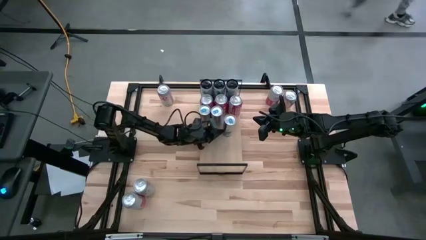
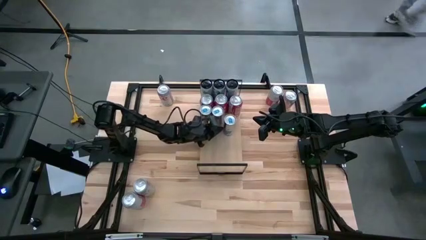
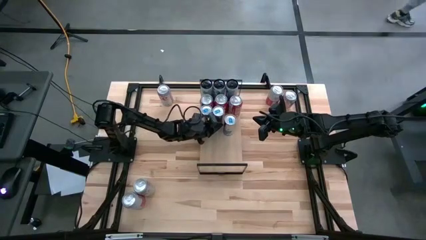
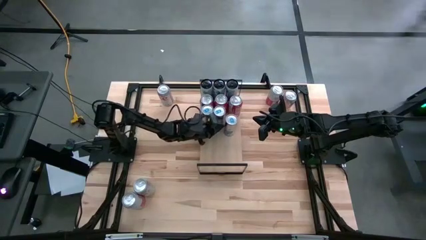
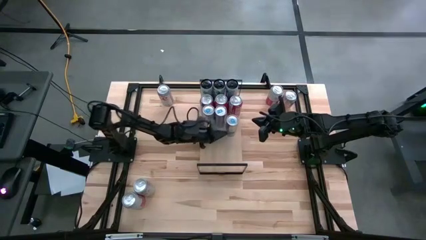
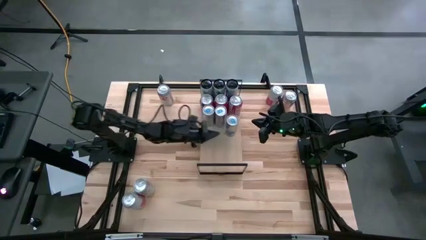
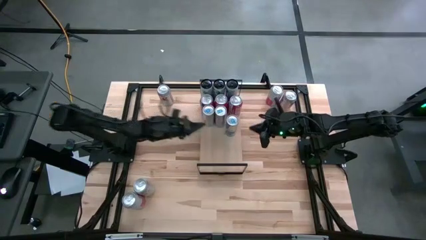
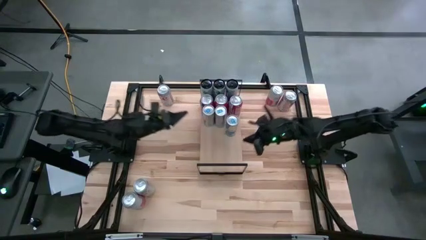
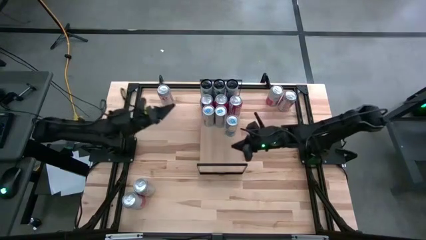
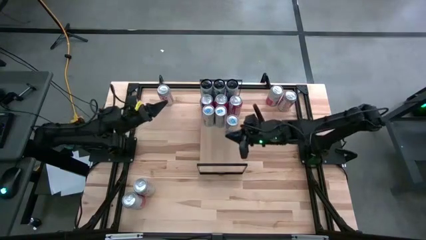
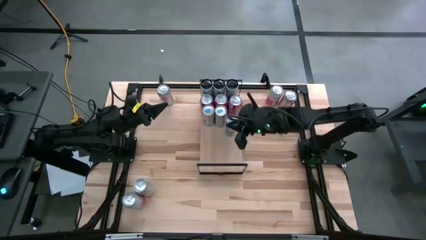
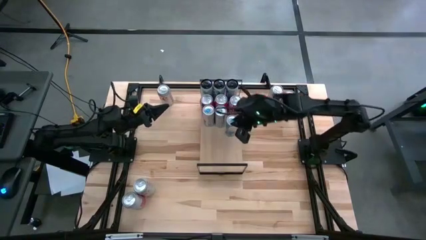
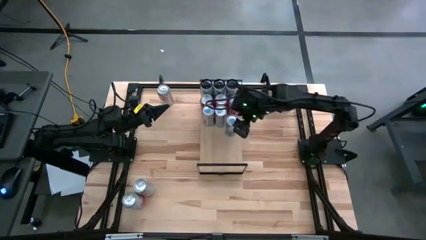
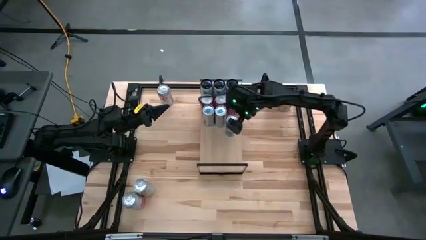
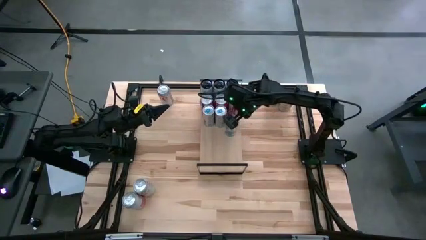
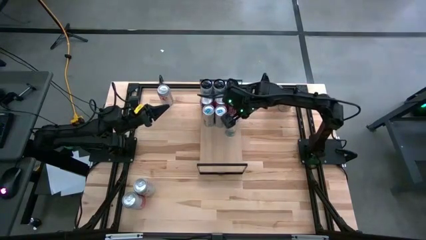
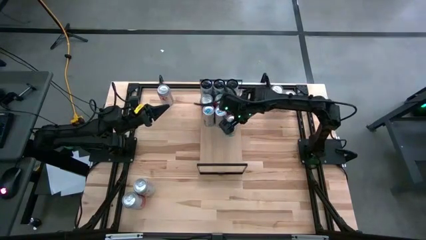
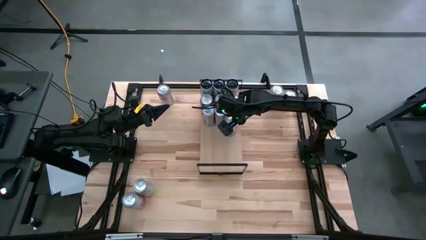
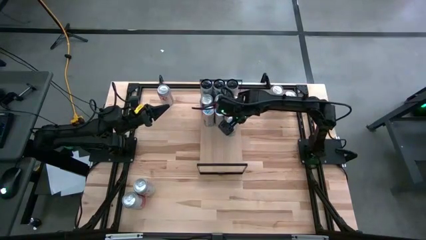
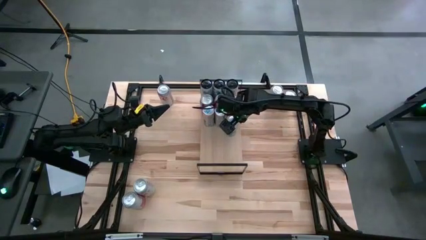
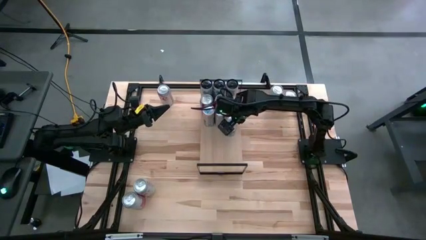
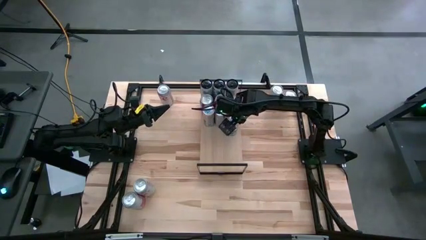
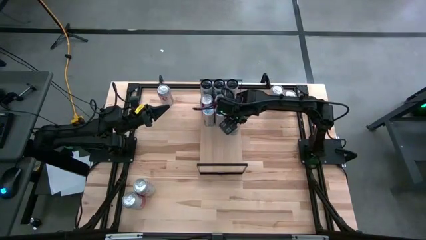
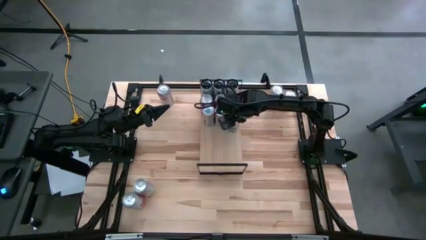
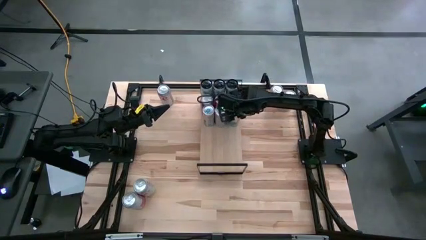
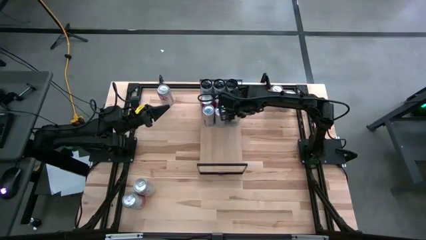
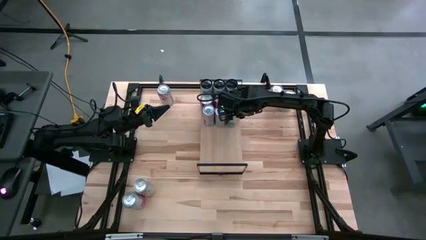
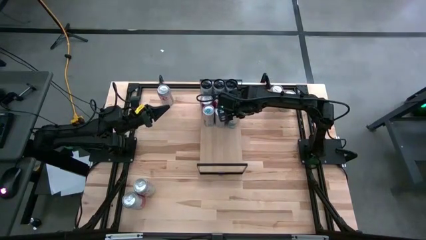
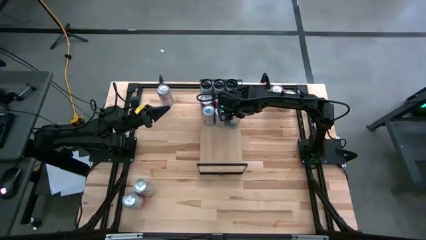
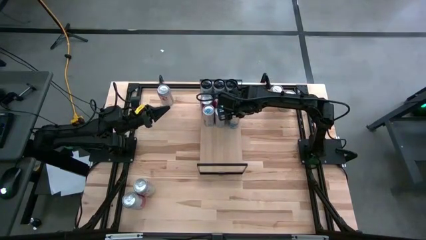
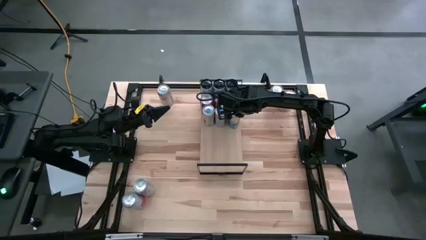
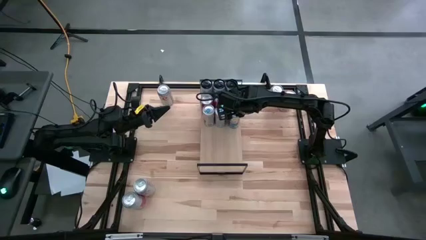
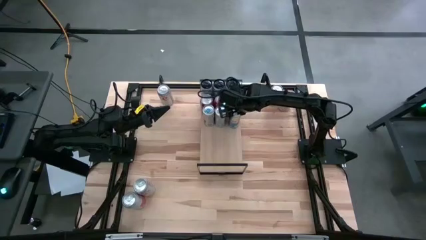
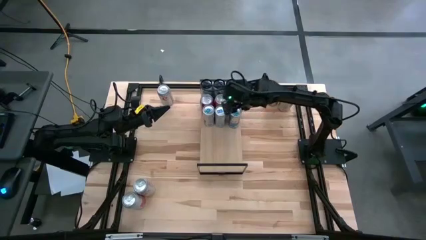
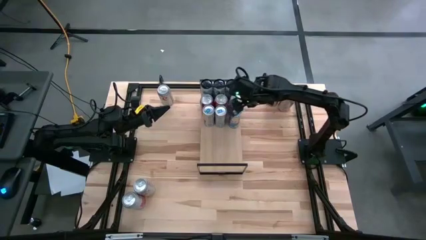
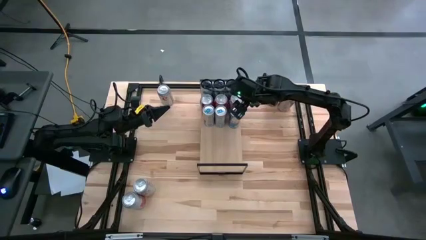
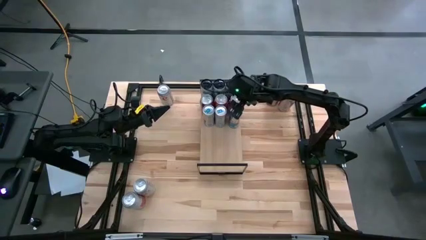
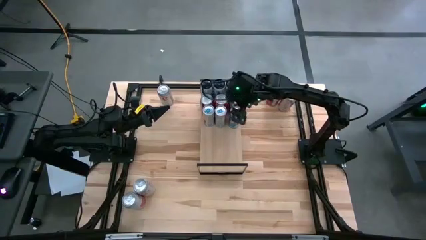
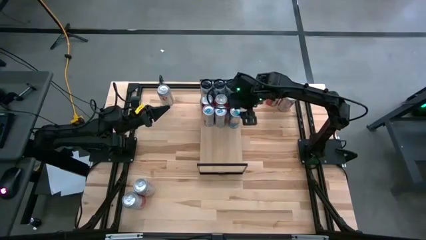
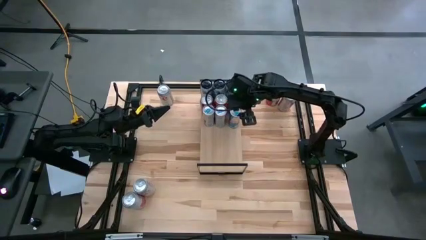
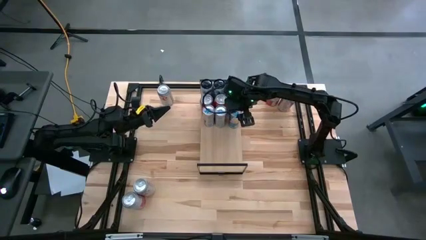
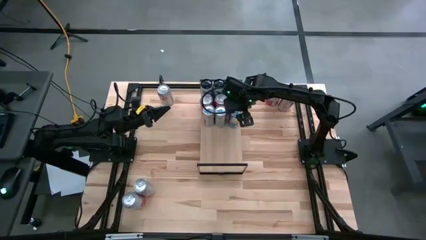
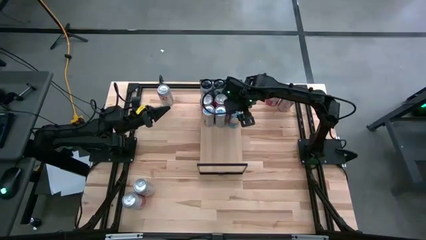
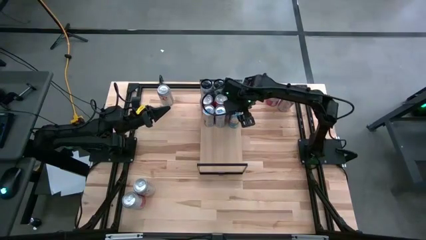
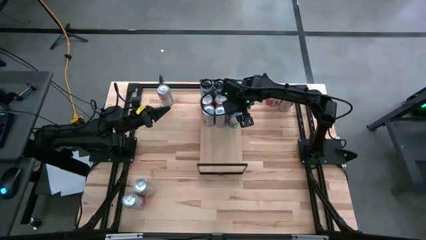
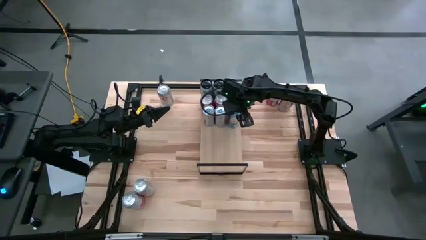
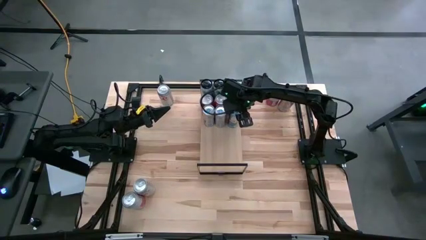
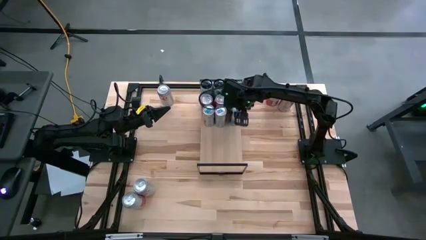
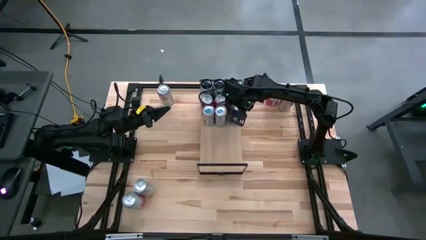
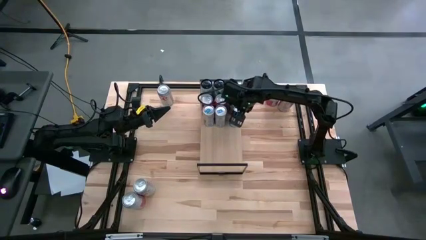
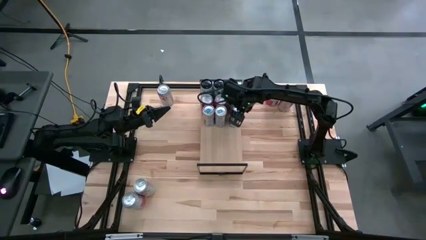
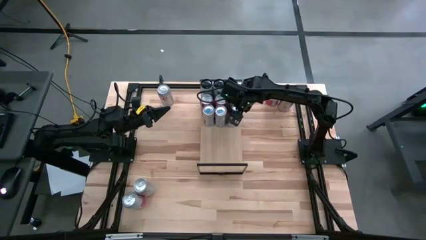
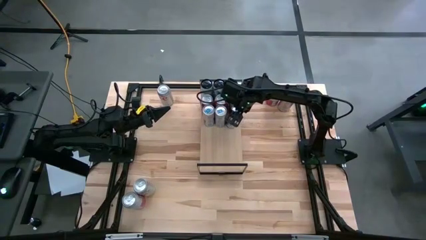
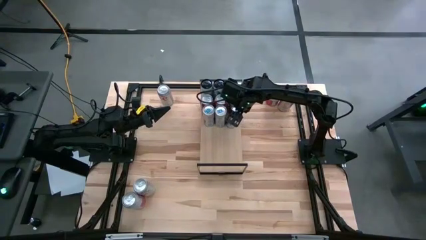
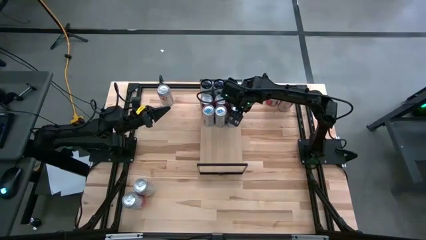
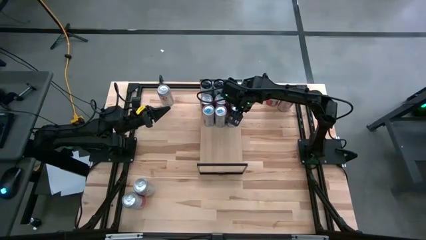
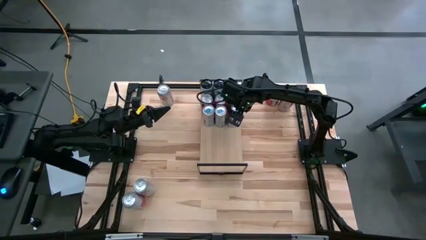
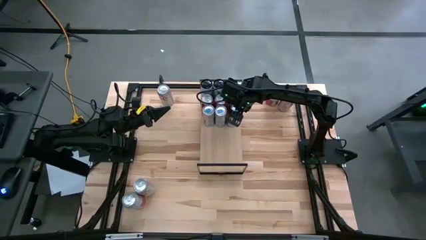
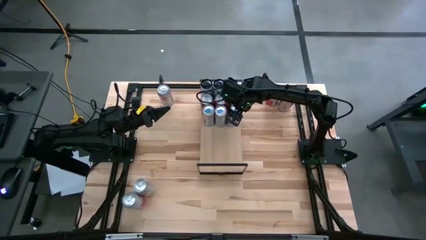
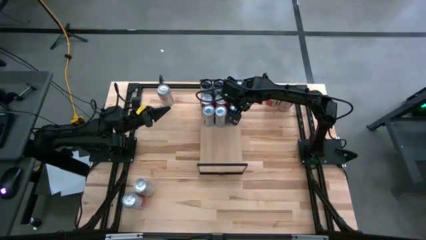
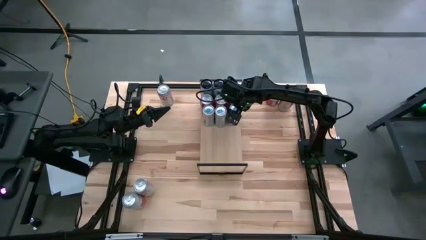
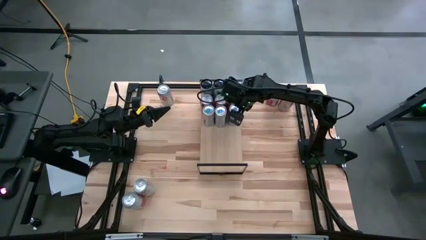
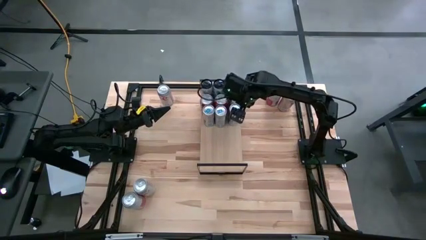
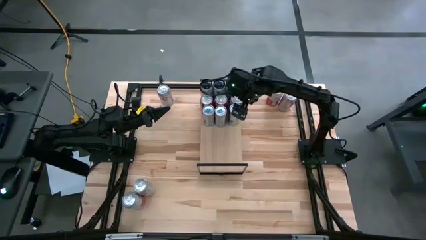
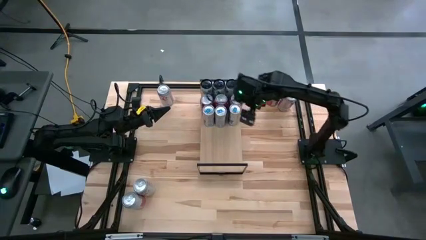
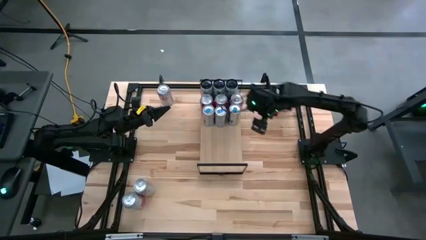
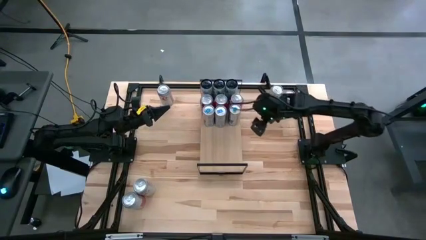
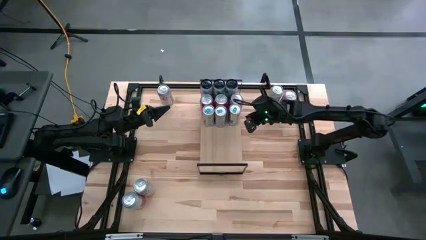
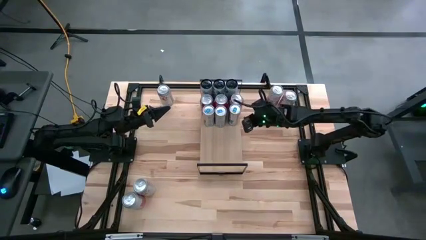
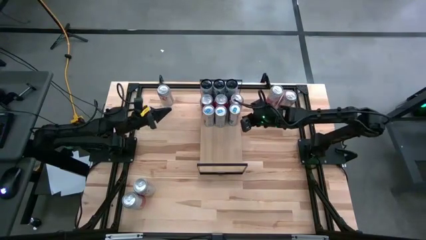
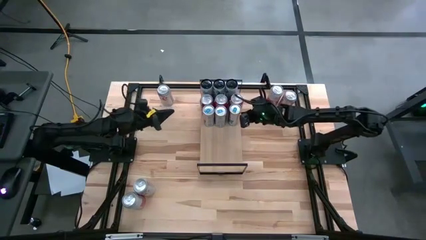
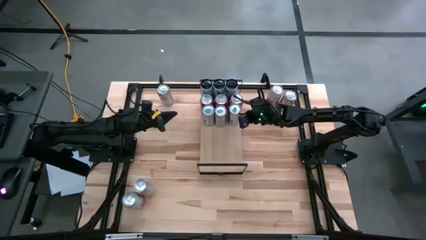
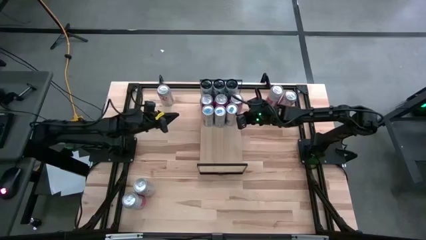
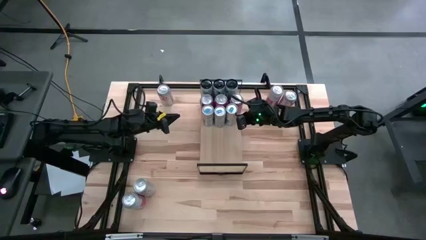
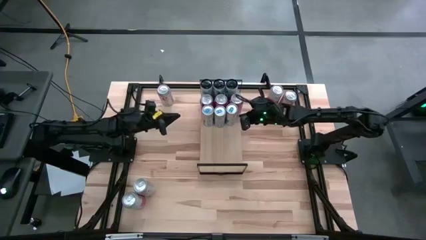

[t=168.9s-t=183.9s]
Task: Place canned beverage on shelf
Put the blue soda can on the shelf aligned with the other blue soda can
